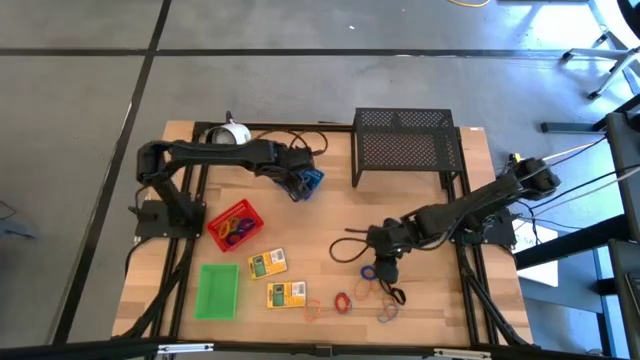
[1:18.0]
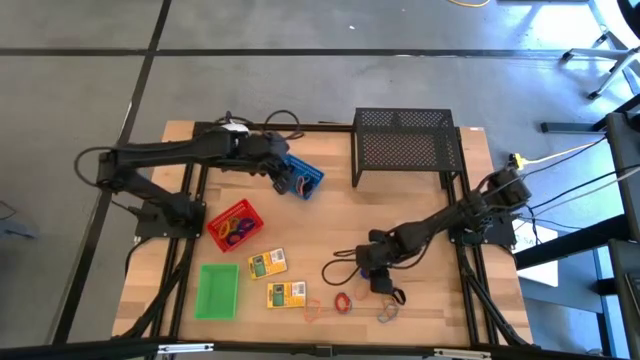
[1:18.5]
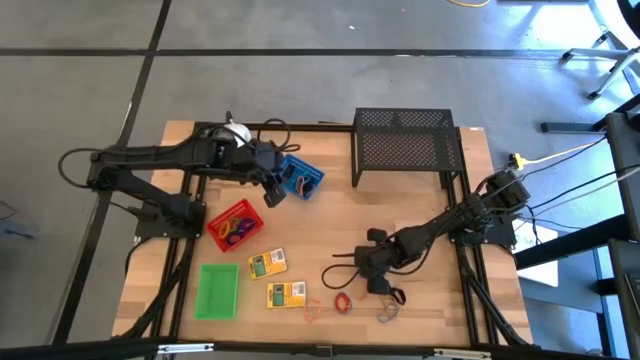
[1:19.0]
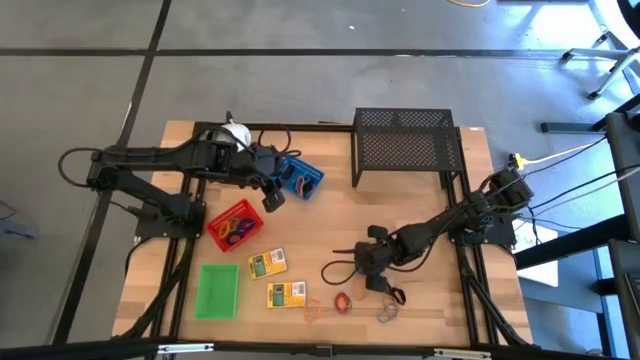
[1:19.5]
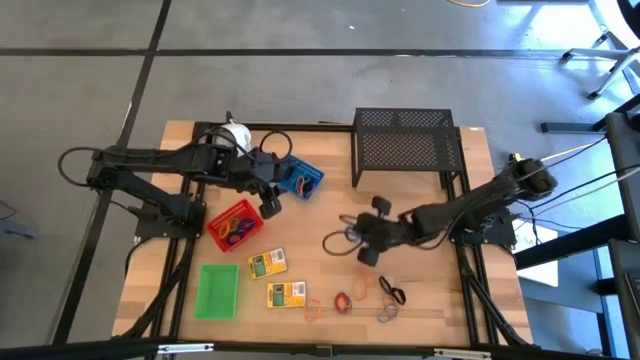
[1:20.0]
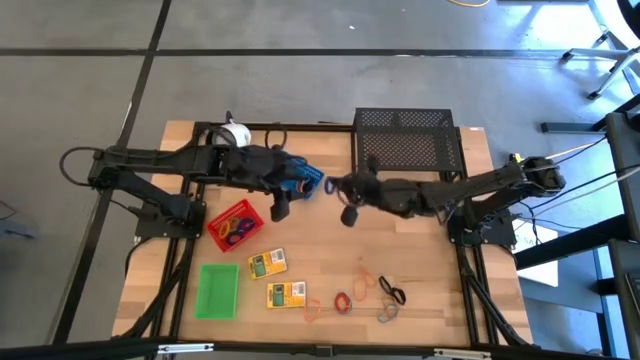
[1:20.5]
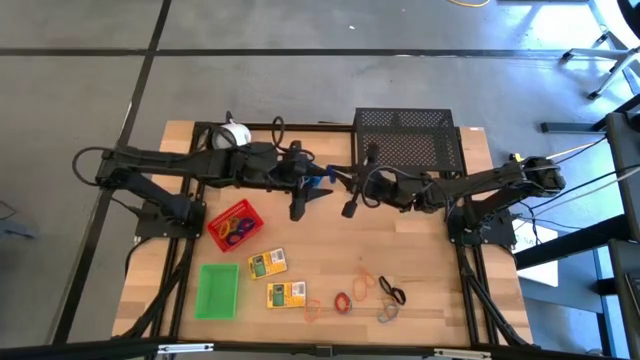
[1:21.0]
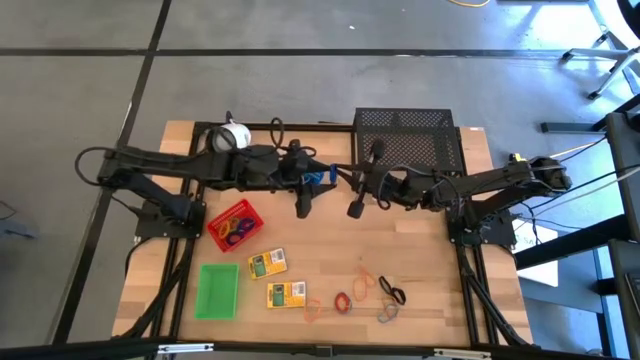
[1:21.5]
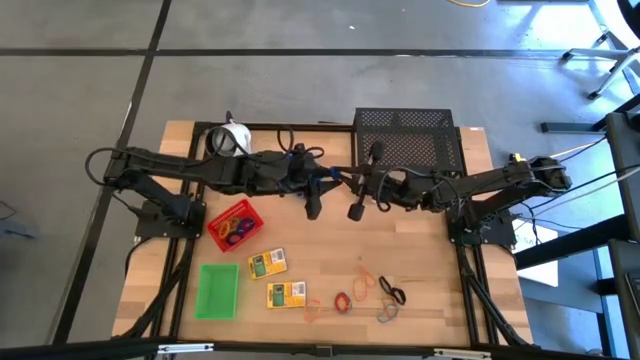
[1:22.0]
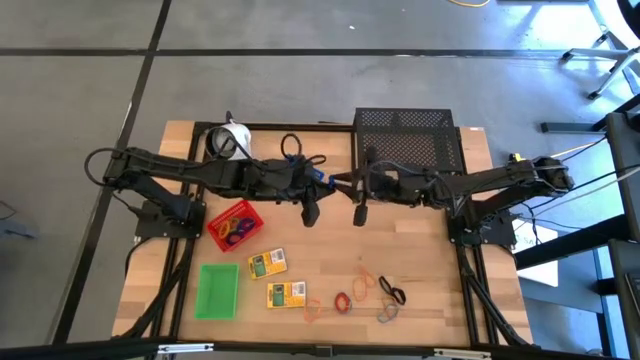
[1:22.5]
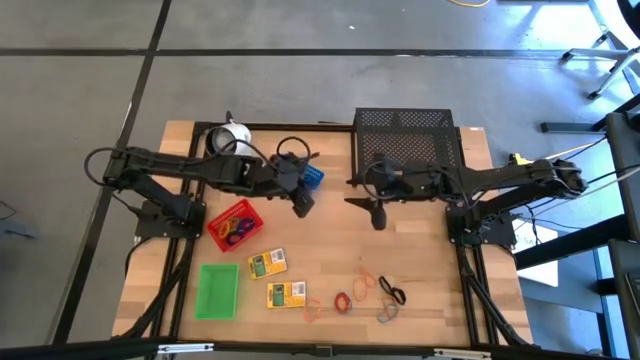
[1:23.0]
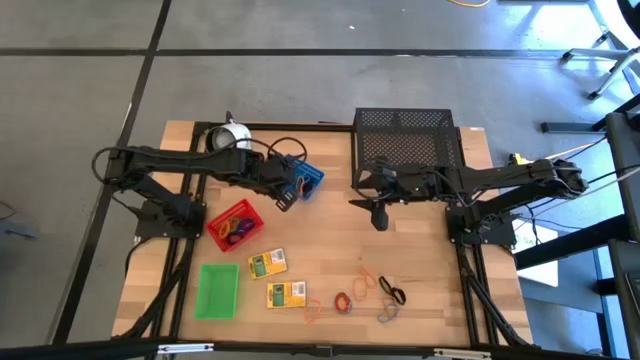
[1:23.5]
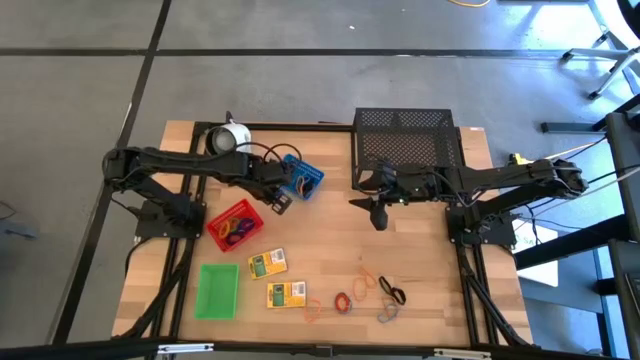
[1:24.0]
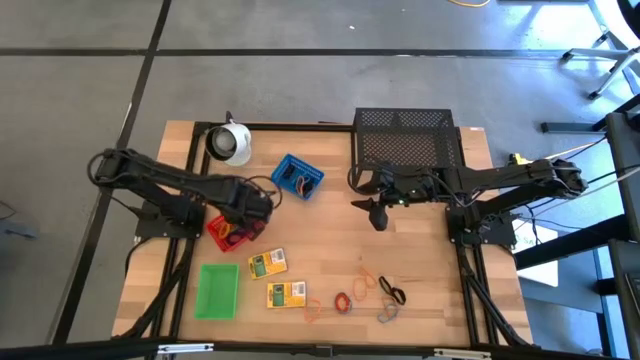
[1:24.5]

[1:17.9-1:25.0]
Task: Pick & Place Office Desk Supplies
Put the blue spring keychain into the red bin

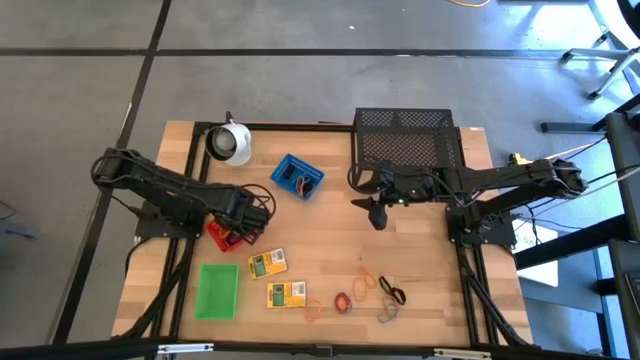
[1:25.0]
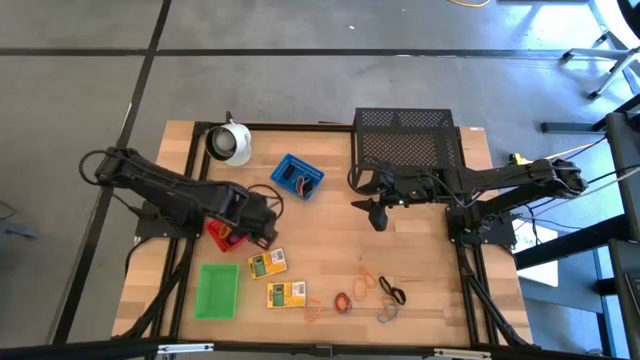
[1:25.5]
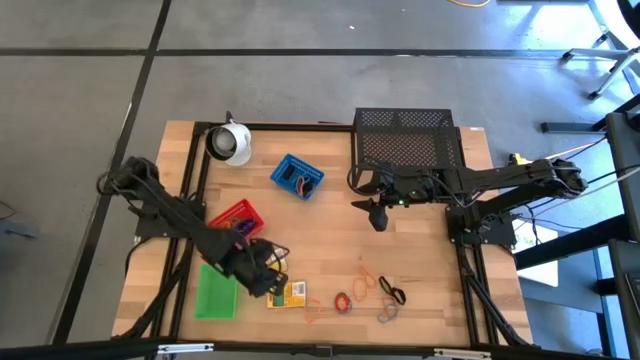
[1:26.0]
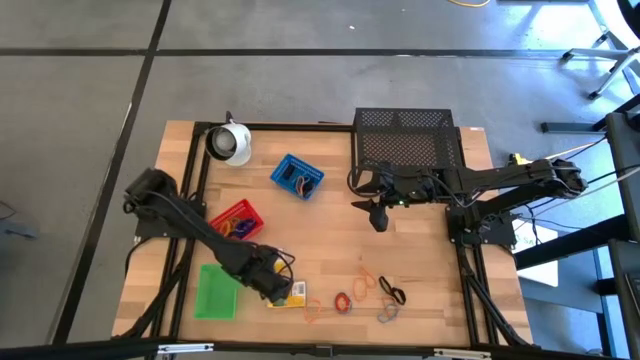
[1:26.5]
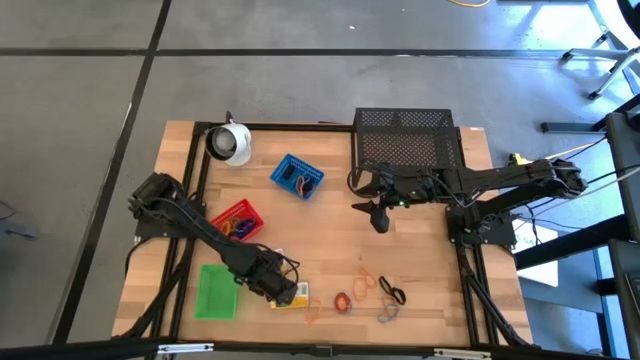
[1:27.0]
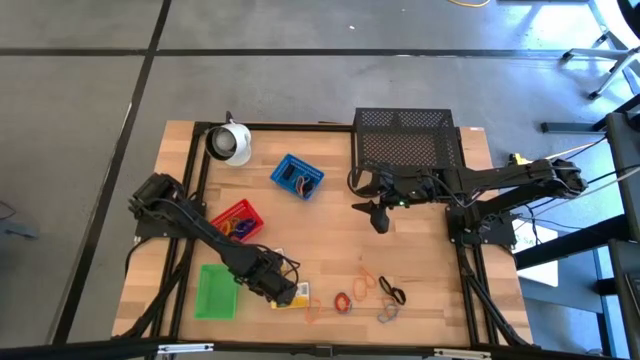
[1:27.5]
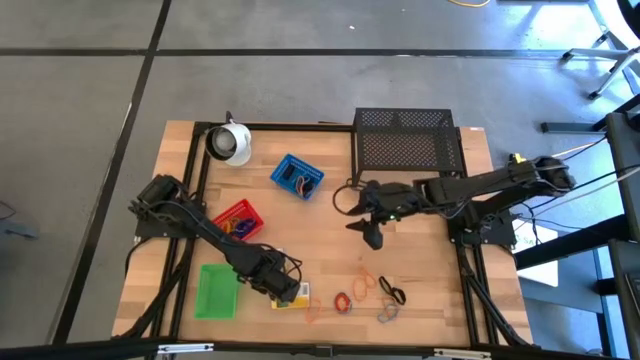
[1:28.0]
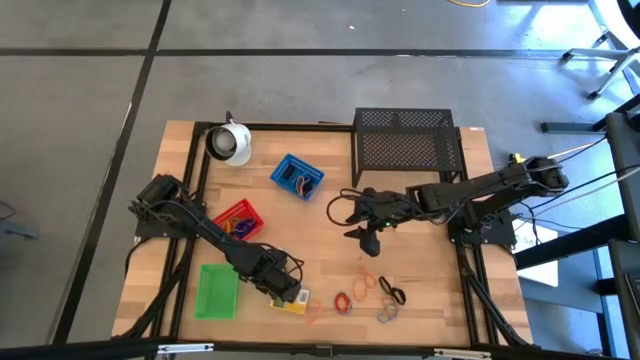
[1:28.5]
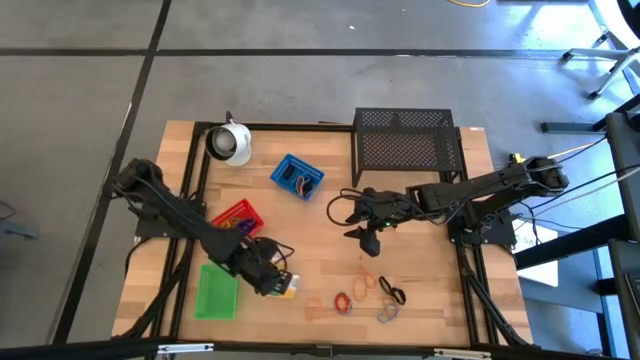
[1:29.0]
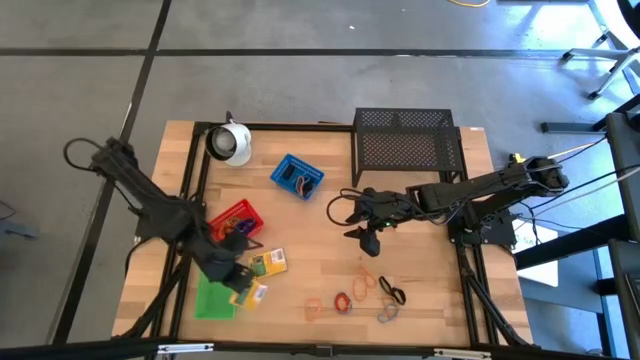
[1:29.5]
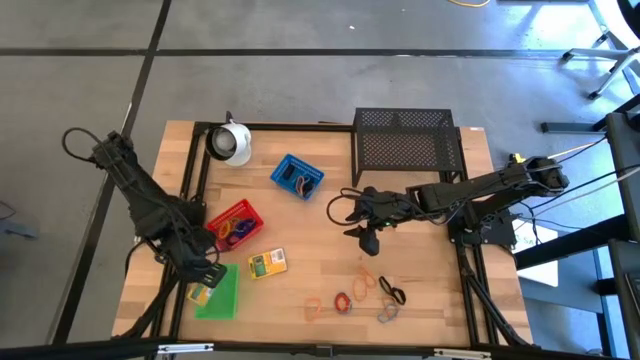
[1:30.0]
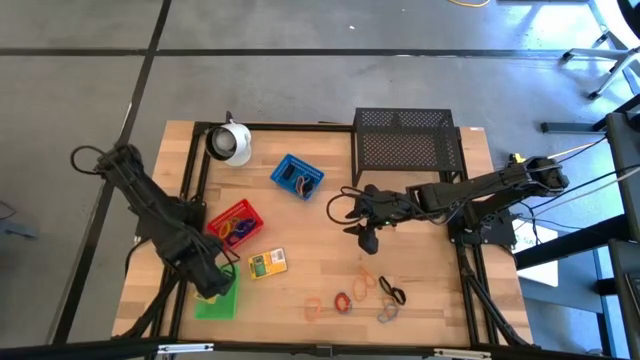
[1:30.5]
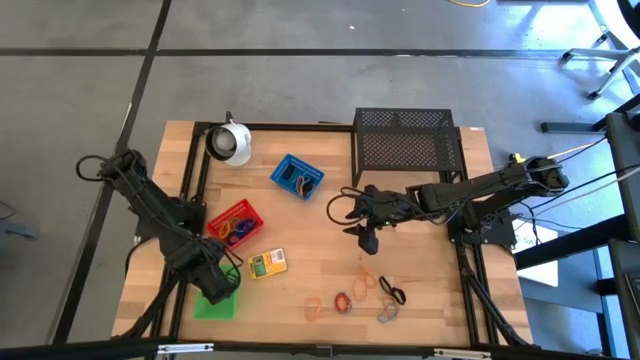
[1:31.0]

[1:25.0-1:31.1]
Put the yellow crayon box into the green bin

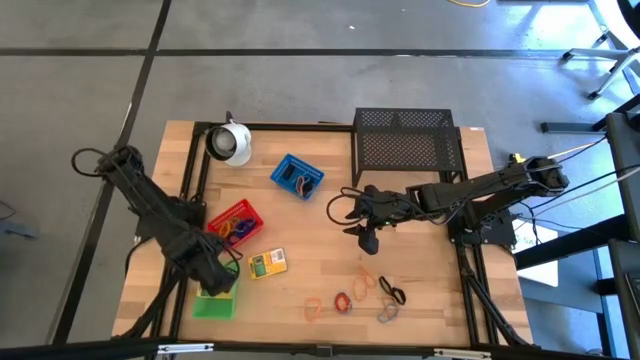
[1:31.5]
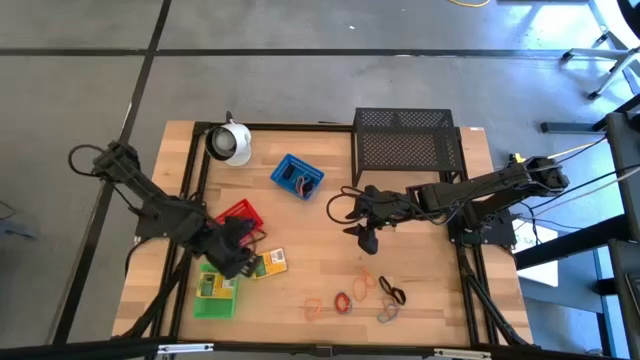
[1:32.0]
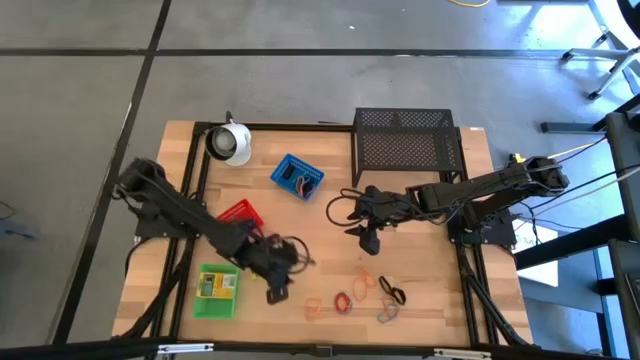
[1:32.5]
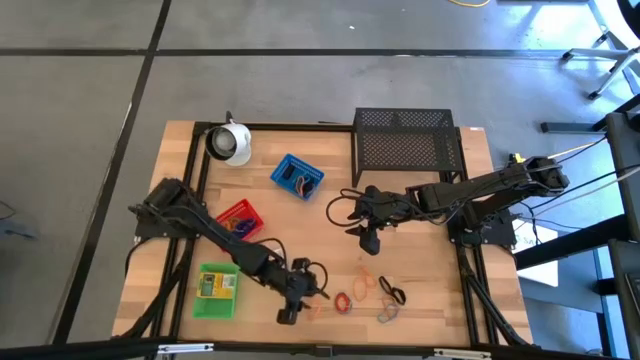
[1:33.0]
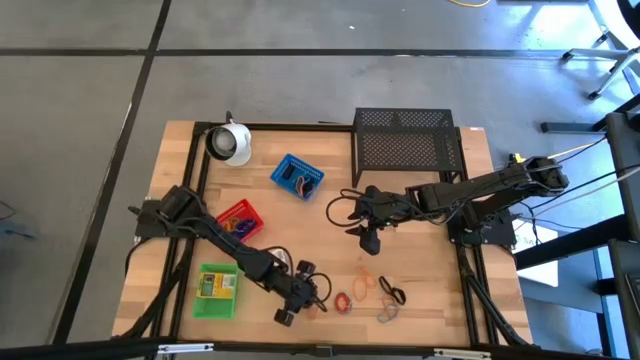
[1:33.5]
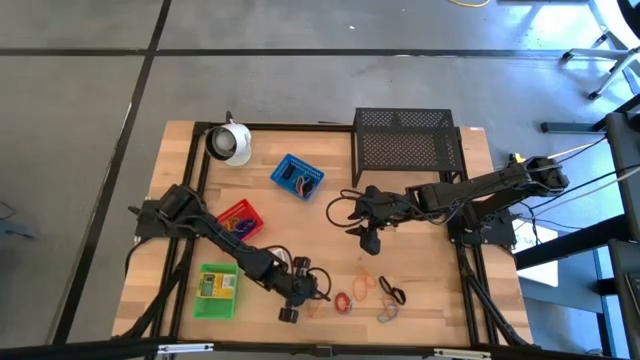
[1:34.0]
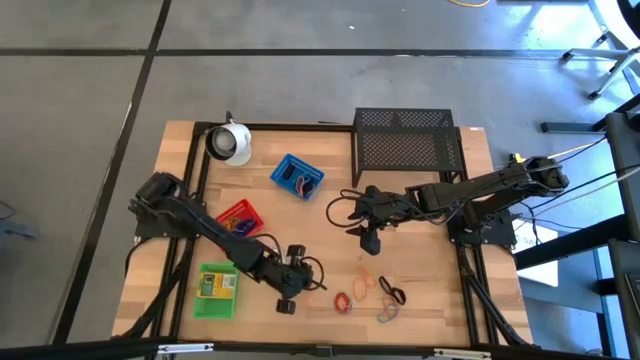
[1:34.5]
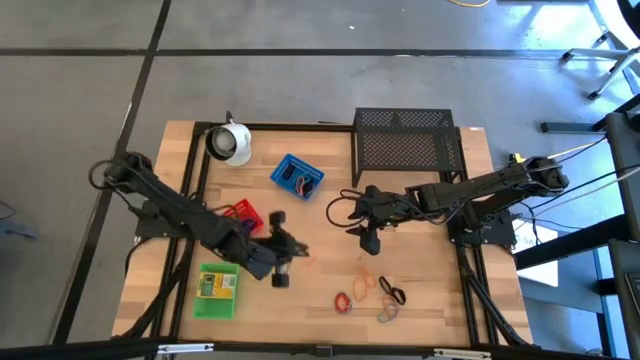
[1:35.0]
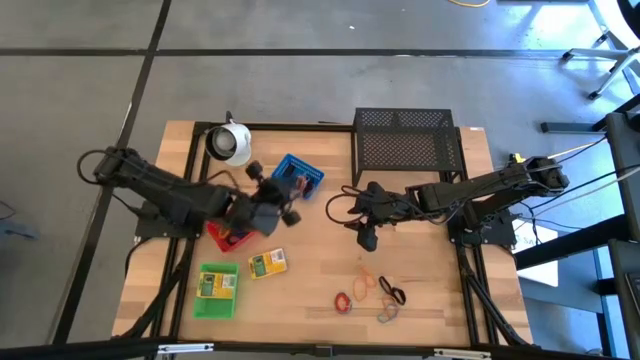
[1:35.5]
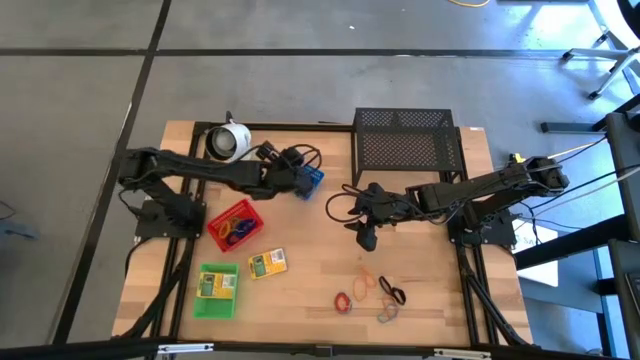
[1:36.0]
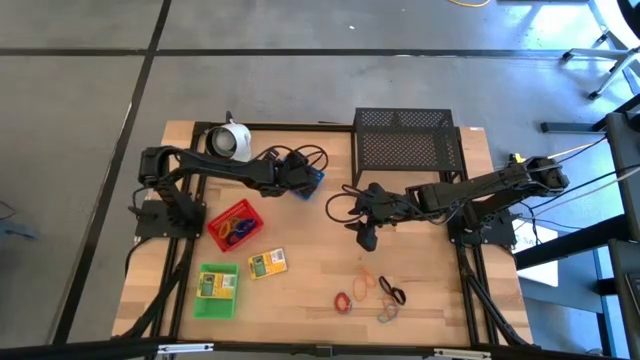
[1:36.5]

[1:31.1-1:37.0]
Put the orange rubber band into the blue bin

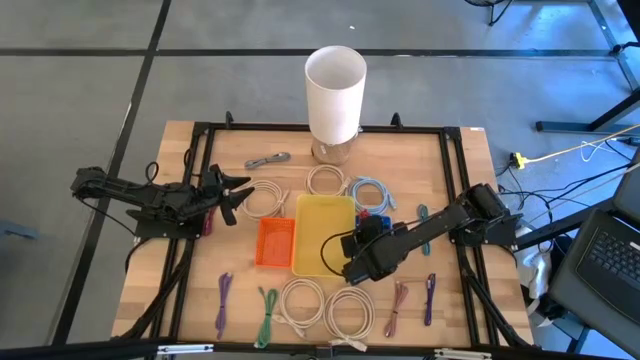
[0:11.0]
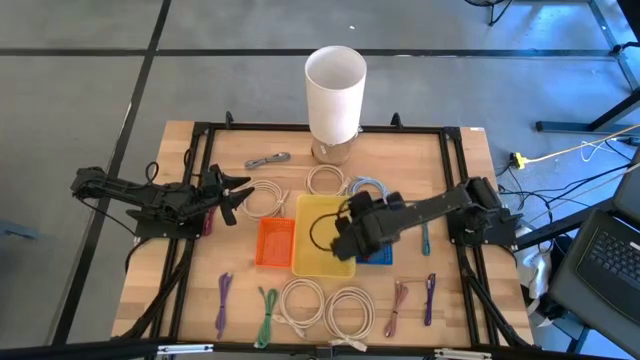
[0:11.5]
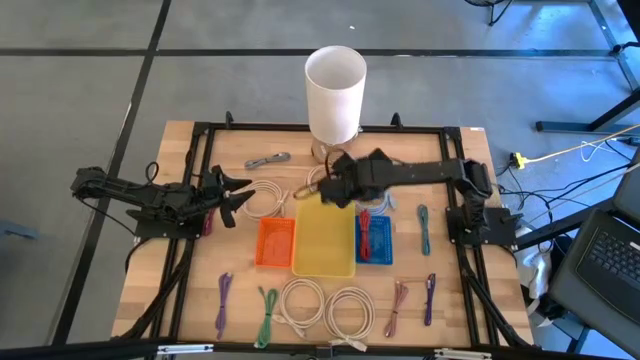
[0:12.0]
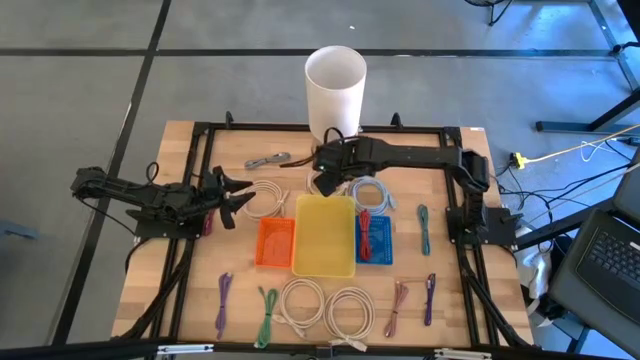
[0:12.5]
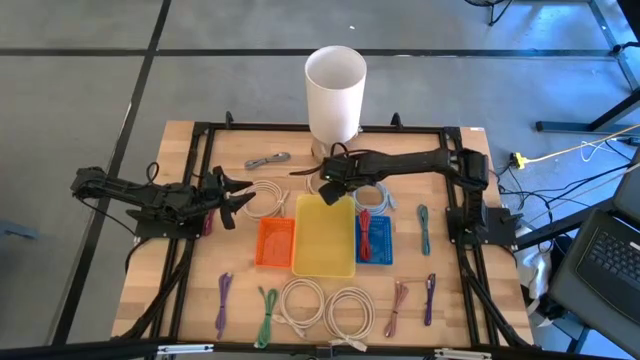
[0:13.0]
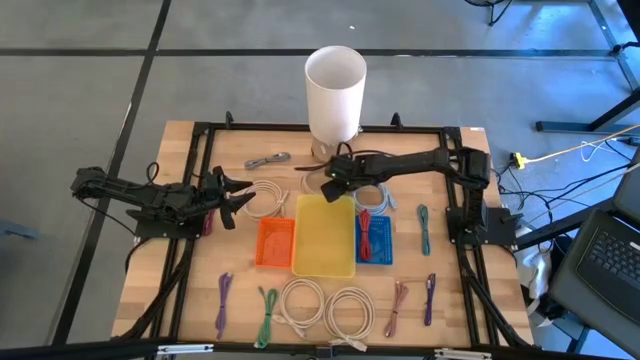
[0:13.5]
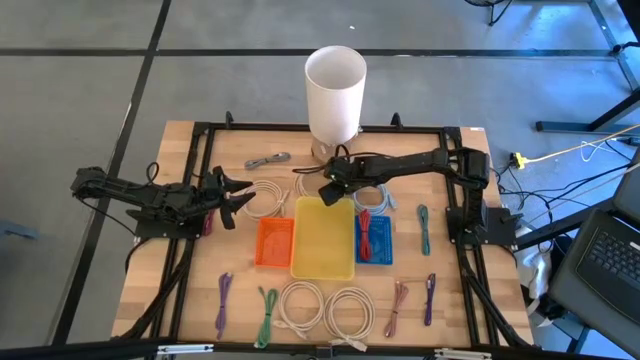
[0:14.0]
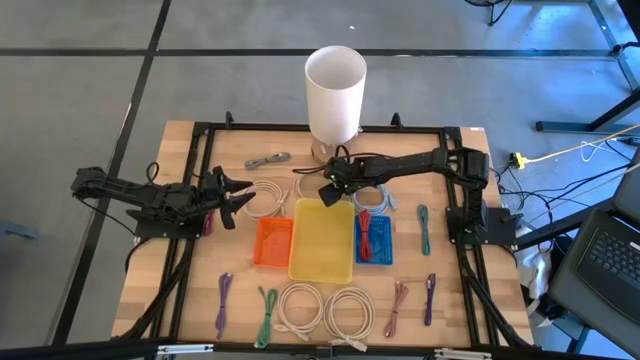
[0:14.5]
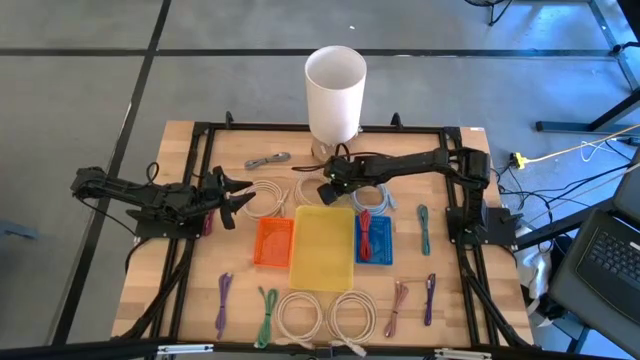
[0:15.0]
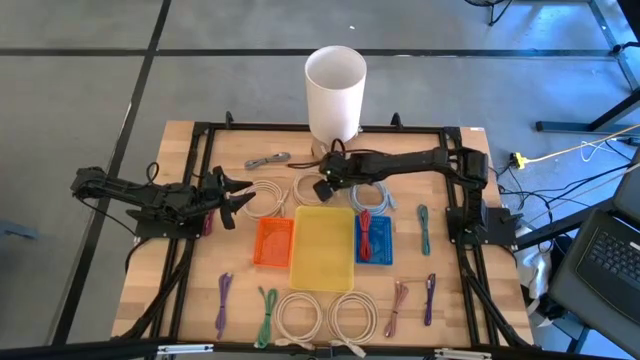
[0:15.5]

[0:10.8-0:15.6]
Task: Pick & Place USB Port
Put the brown HDMI cable into the yellow bin
